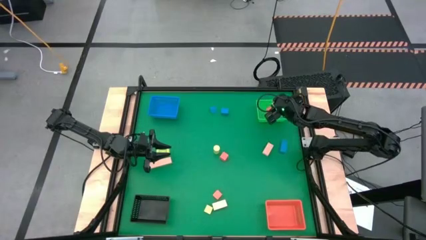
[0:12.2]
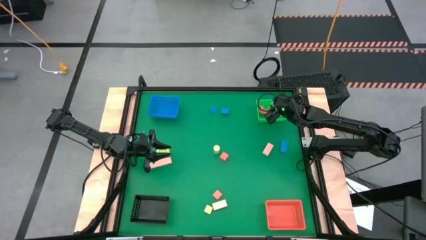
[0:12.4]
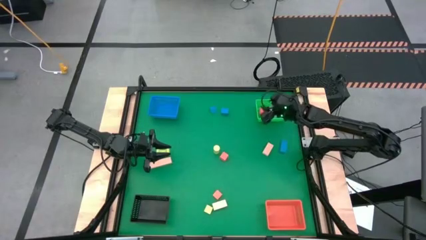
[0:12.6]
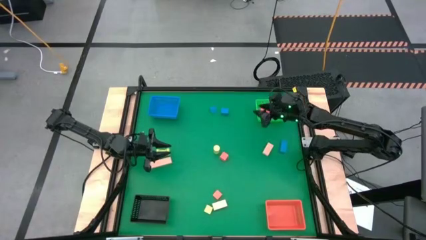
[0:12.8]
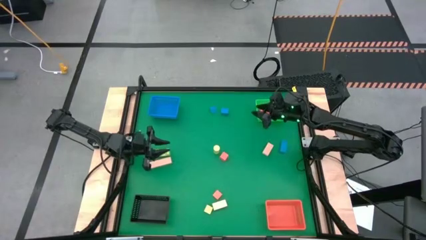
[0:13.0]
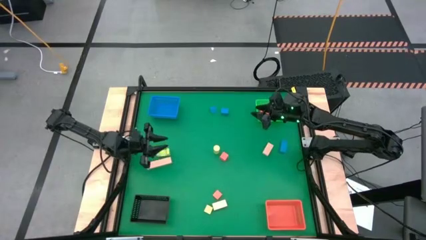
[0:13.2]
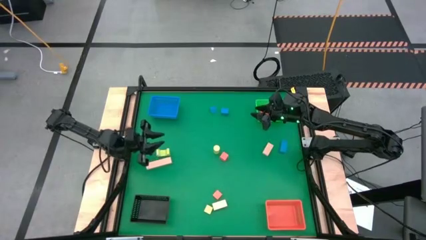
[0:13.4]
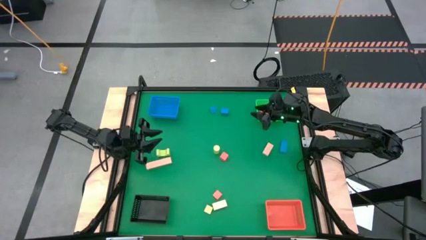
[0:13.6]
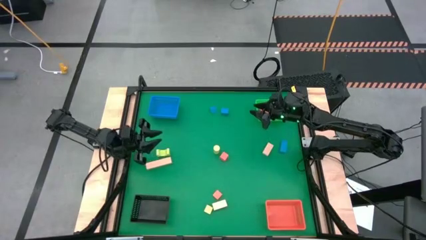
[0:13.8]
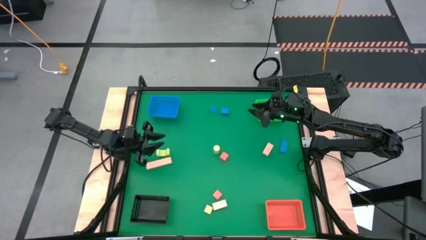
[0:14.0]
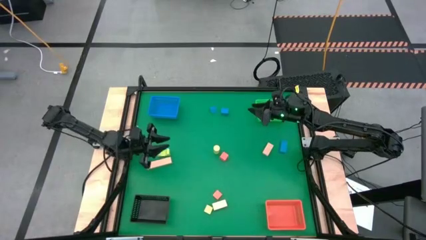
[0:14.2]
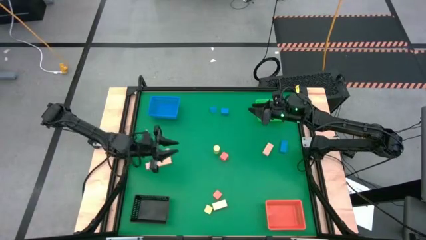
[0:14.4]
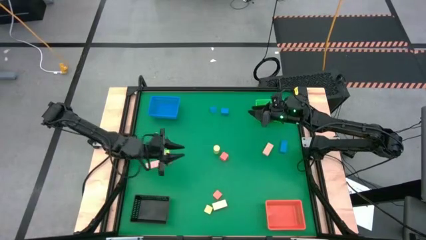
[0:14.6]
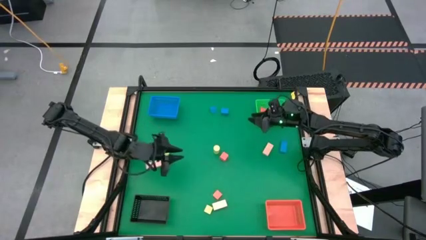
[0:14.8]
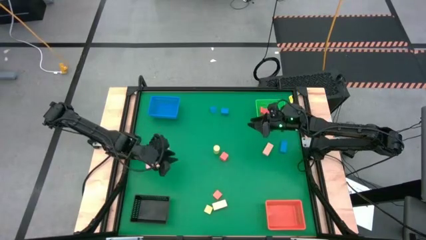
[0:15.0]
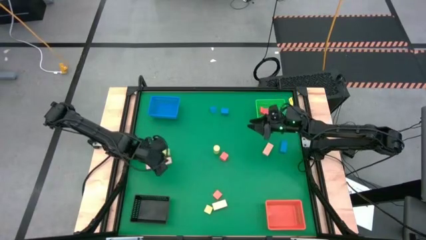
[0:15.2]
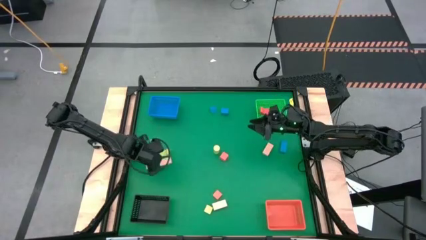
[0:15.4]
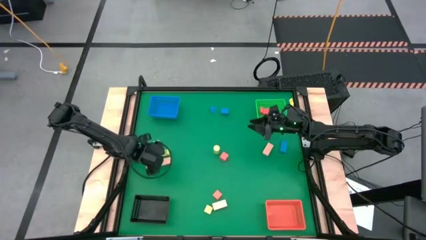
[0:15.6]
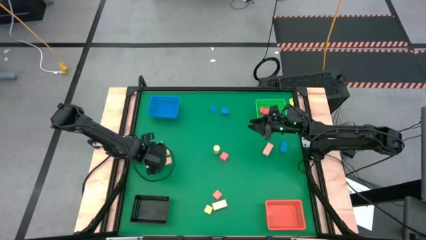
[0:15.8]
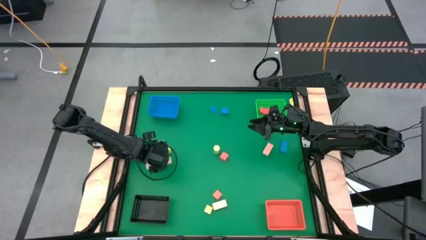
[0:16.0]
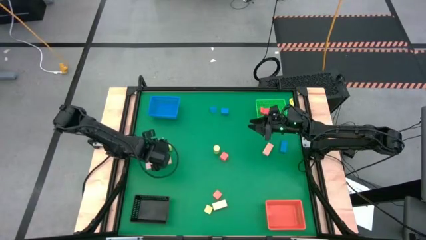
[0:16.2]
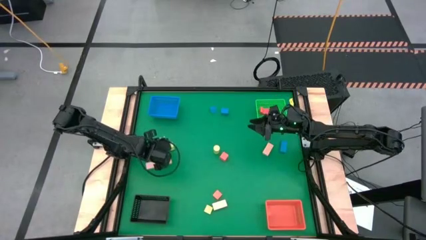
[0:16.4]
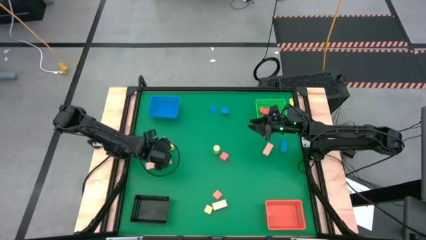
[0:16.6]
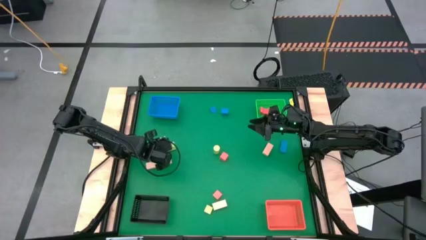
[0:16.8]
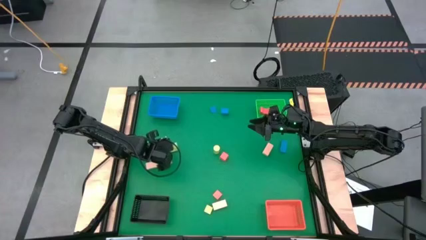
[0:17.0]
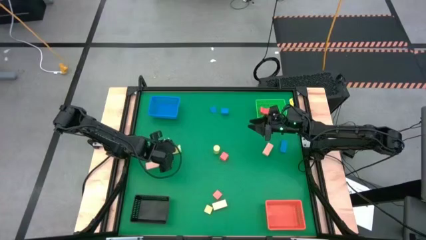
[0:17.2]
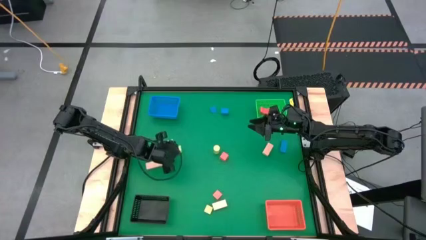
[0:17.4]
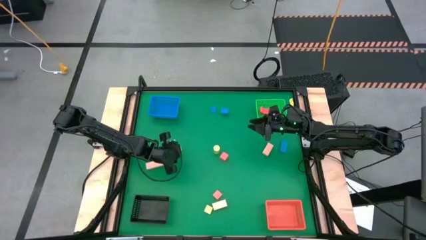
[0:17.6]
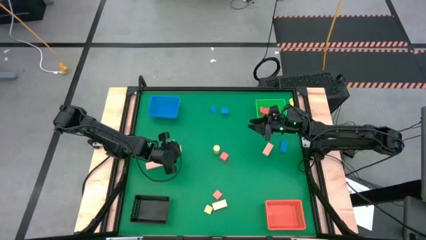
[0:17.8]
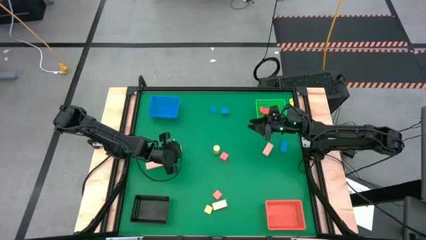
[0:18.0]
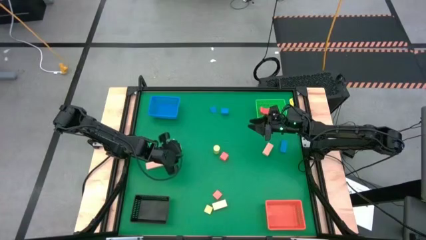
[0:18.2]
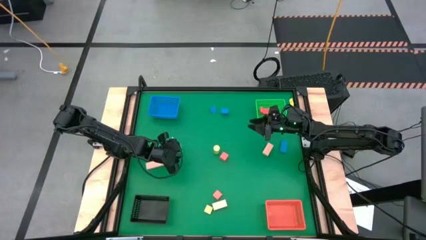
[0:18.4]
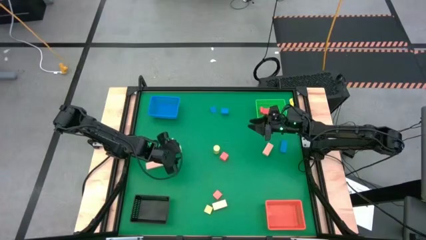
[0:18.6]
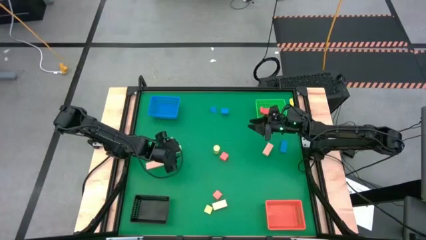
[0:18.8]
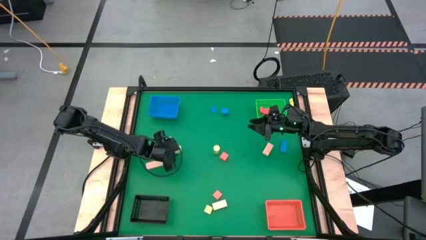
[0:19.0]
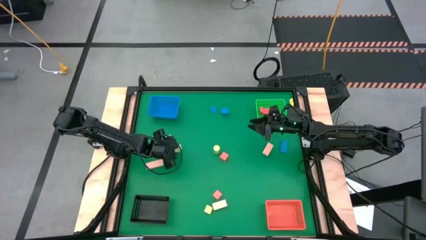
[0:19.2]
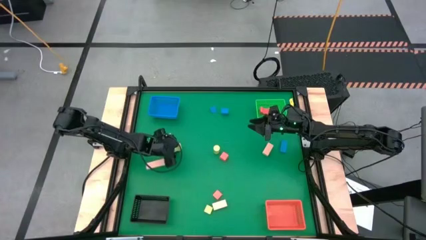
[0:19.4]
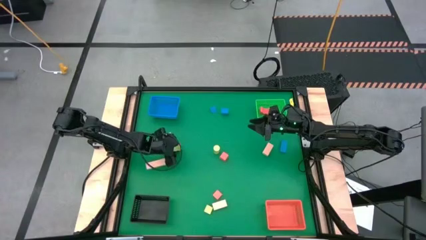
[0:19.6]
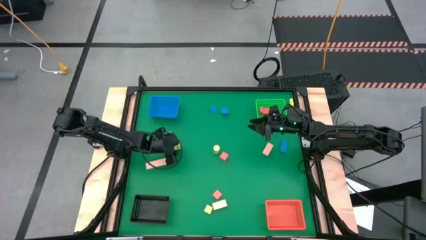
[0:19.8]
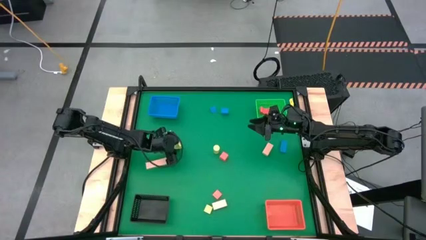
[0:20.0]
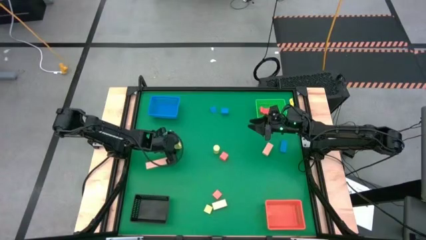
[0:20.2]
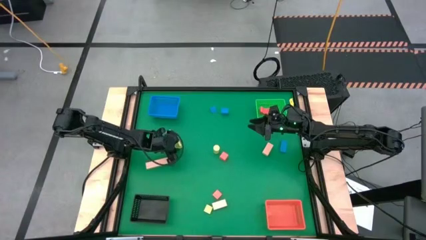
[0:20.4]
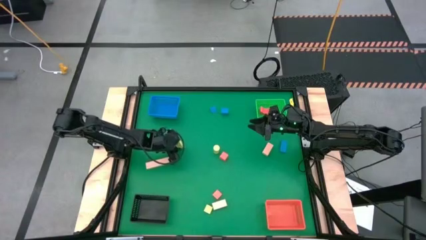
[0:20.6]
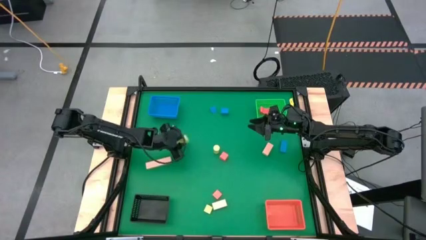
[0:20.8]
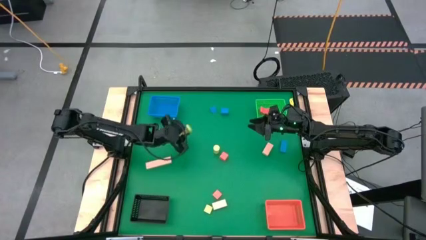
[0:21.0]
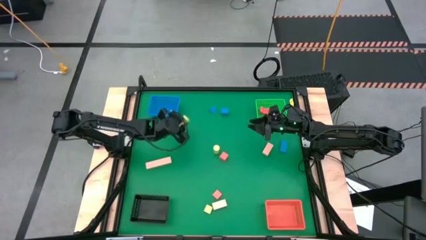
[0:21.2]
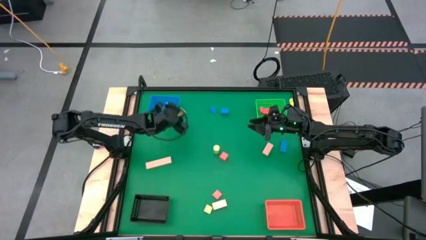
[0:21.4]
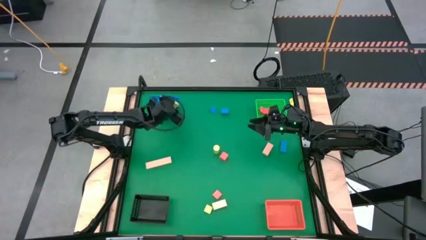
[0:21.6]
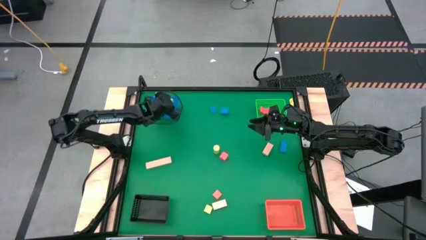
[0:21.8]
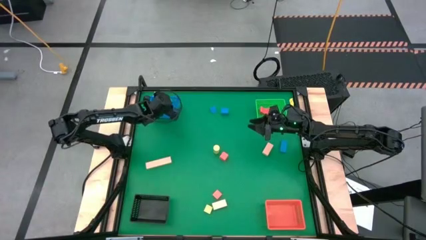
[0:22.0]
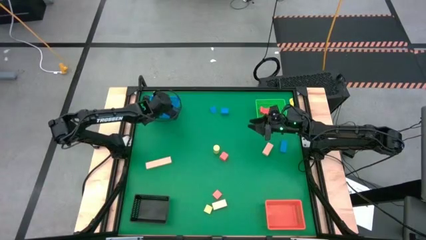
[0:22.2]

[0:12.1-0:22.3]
Task: Sort & place blocks by color
Put the top left green block into the blue bin

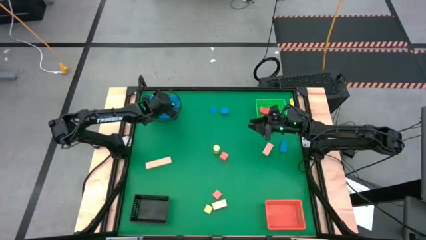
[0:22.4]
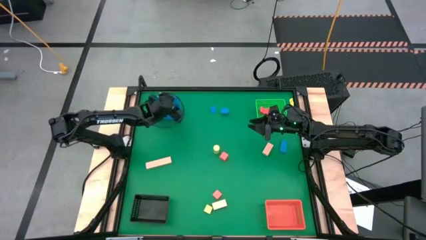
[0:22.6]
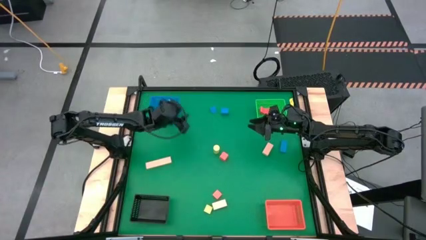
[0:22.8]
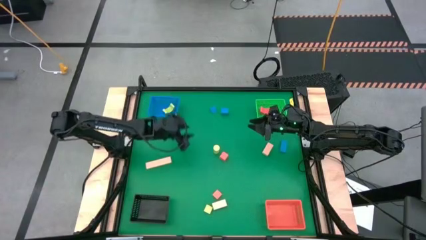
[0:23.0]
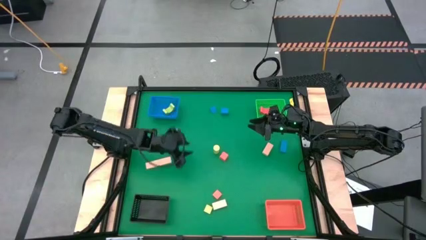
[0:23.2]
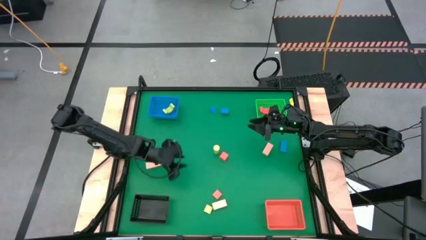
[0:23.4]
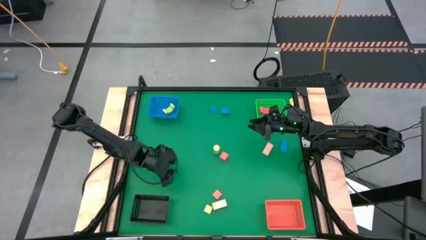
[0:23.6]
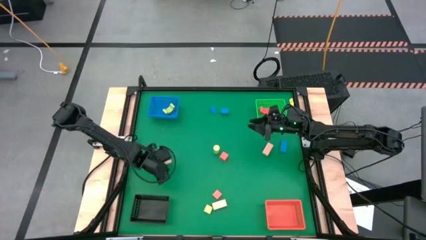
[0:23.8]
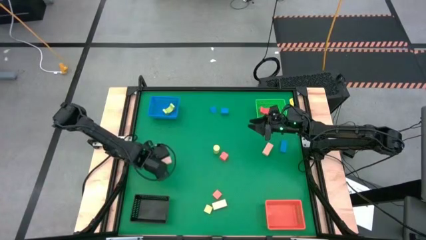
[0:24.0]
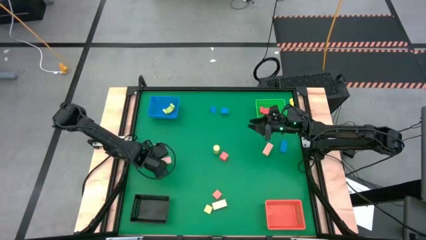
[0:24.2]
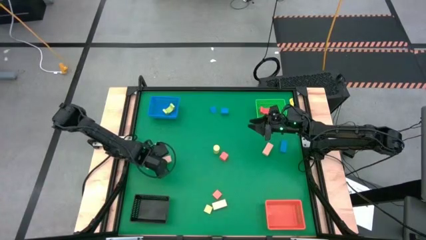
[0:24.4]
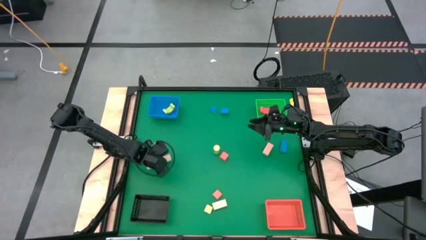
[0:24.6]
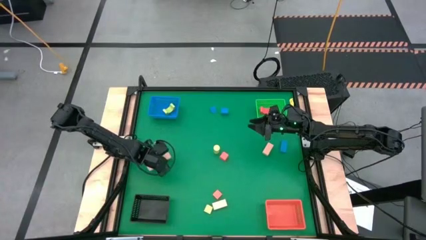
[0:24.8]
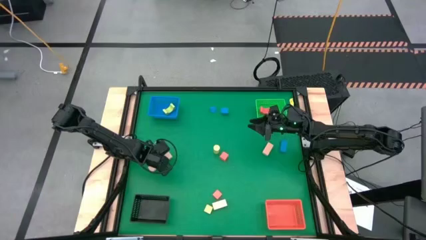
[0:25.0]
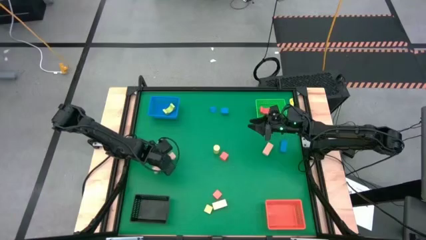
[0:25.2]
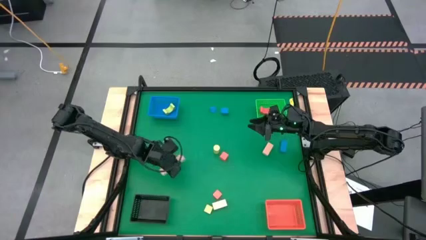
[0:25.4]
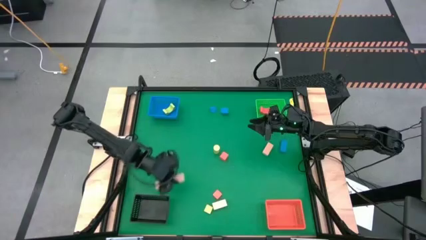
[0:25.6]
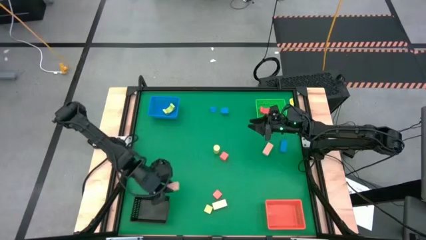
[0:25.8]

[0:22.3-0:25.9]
Put the top left brown block into the black bin

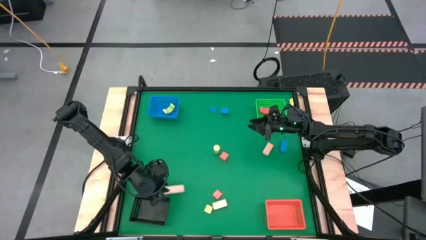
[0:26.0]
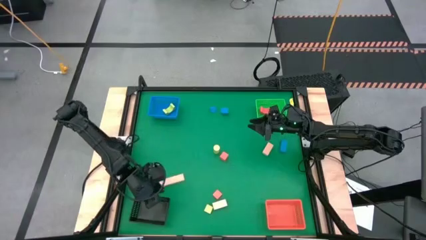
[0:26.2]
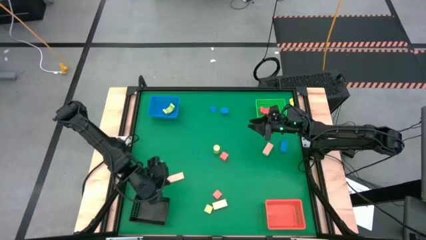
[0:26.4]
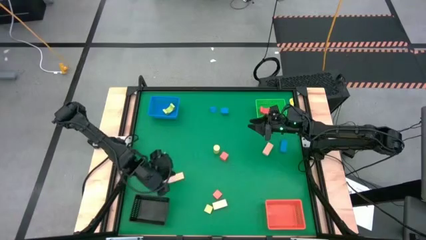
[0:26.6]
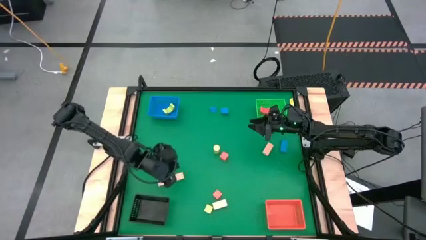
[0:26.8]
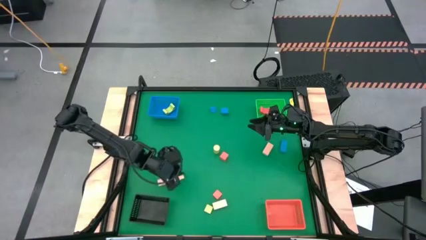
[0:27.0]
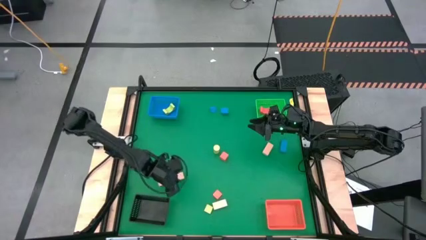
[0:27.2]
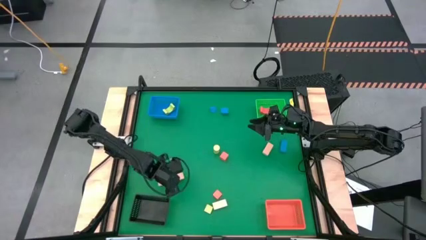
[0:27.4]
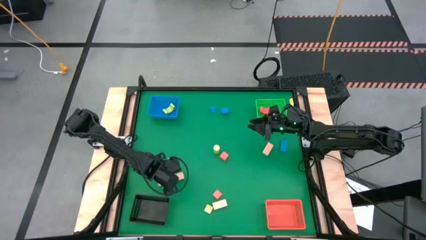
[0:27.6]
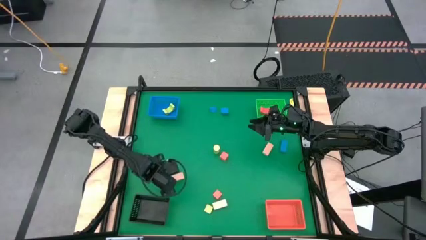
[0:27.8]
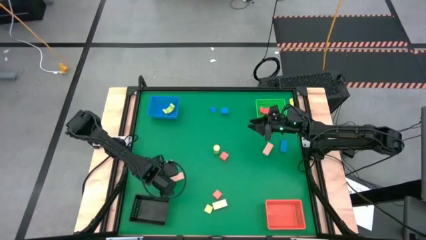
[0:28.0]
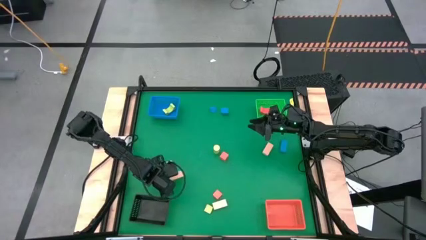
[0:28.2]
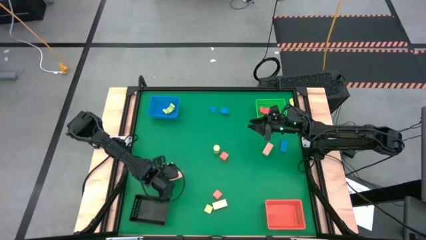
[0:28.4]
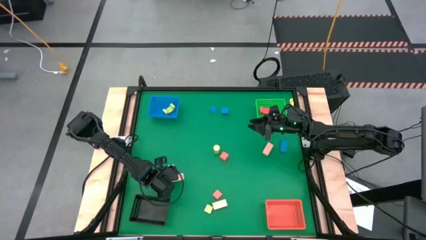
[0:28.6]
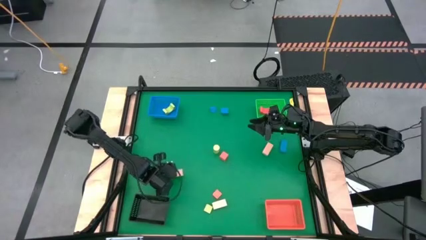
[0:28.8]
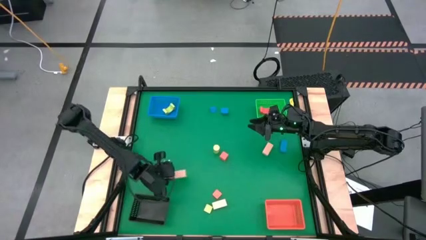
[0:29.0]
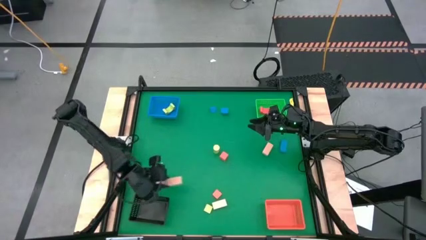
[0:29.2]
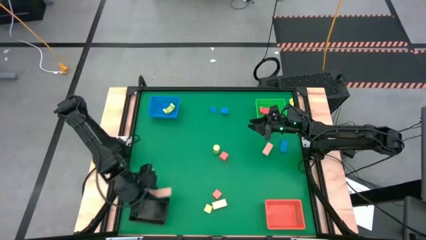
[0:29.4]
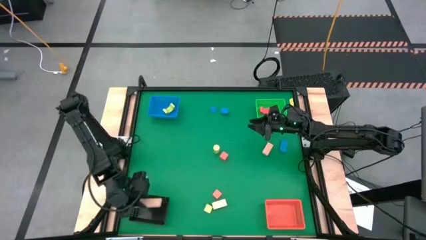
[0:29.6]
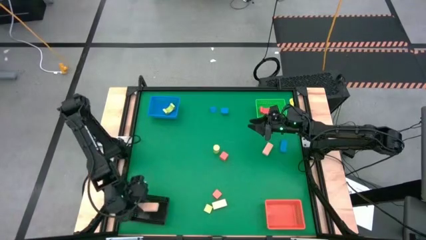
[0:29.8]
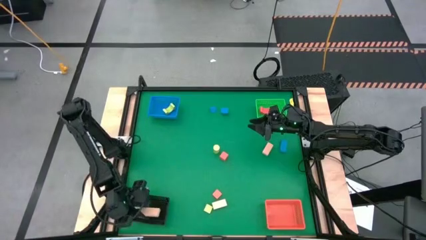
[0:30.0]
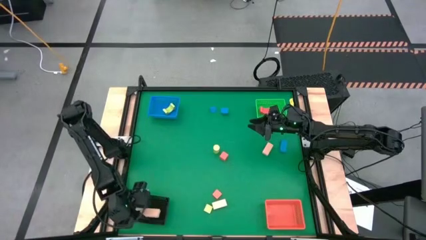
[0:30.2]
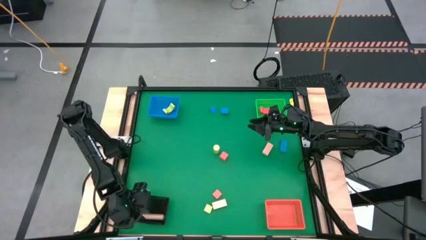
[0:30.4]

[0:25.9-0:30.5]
Put the top left brown block into the black bin
